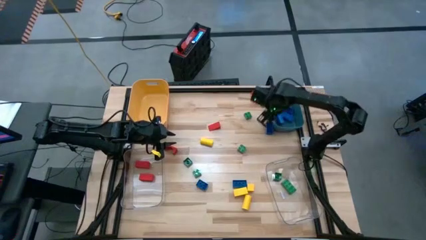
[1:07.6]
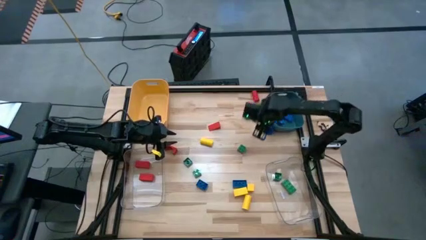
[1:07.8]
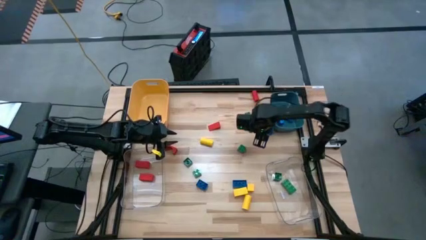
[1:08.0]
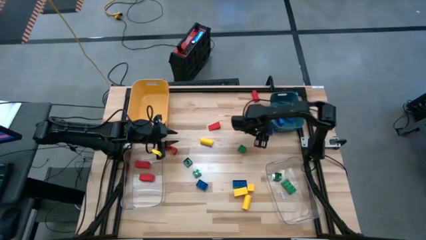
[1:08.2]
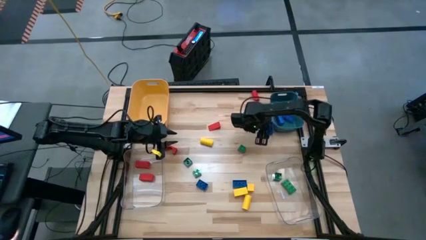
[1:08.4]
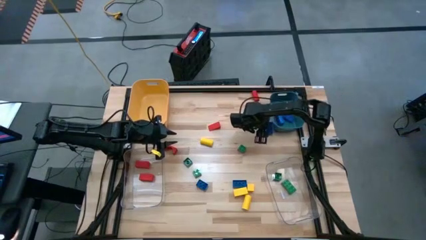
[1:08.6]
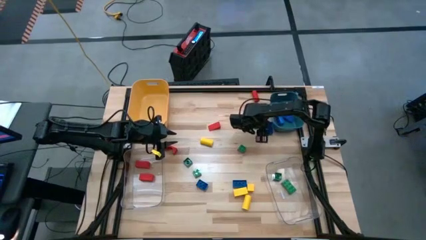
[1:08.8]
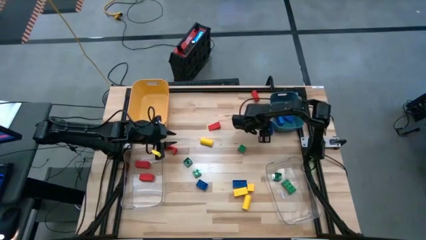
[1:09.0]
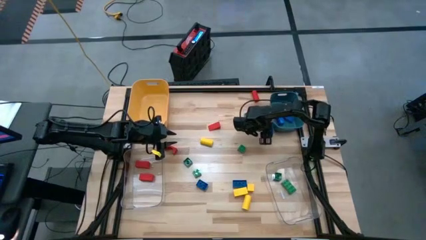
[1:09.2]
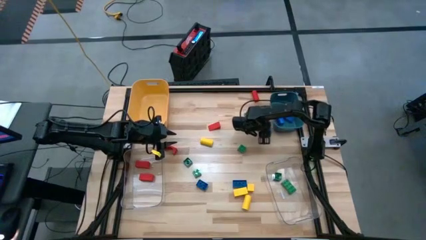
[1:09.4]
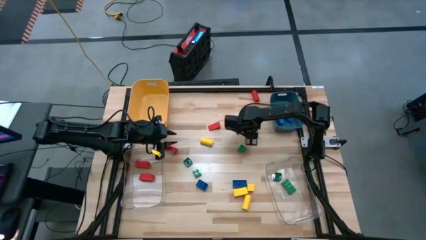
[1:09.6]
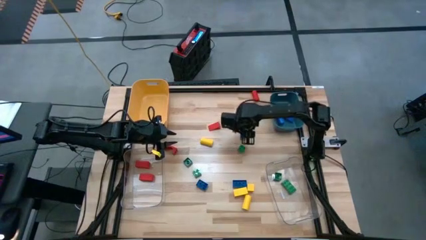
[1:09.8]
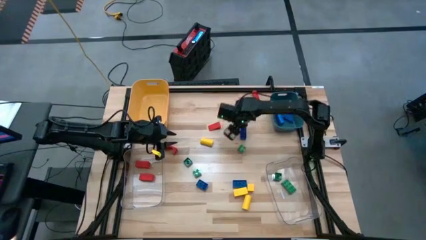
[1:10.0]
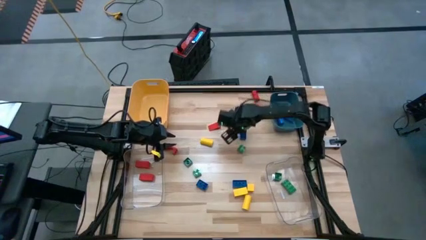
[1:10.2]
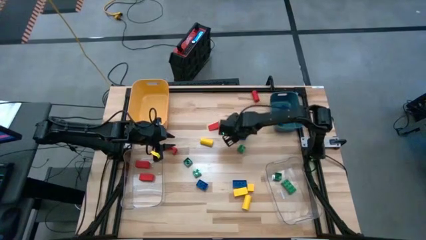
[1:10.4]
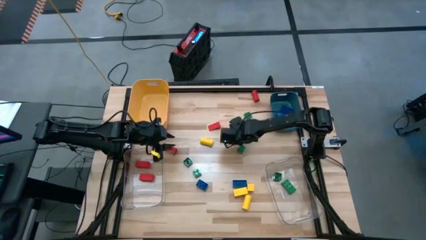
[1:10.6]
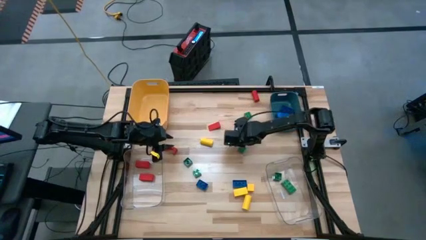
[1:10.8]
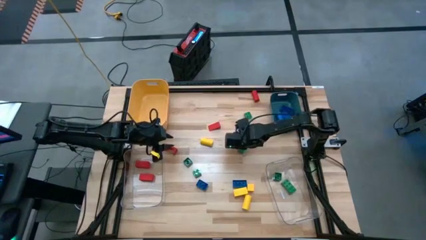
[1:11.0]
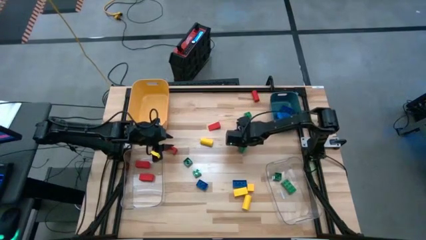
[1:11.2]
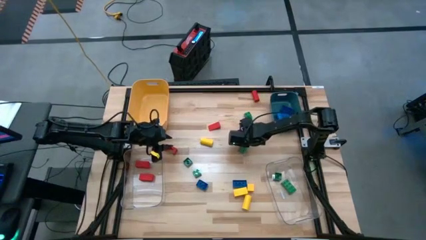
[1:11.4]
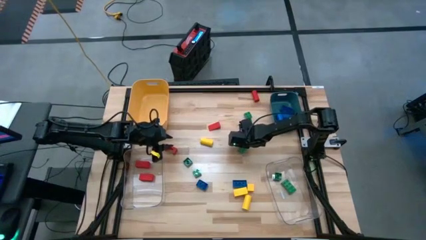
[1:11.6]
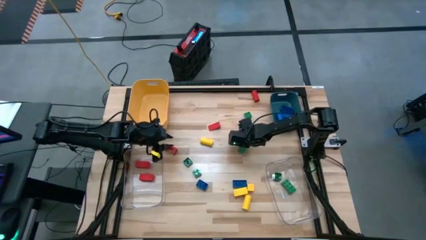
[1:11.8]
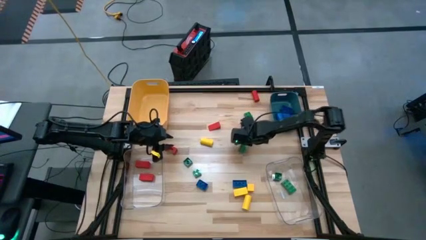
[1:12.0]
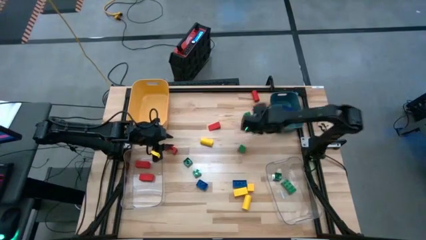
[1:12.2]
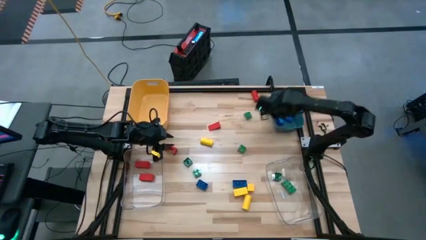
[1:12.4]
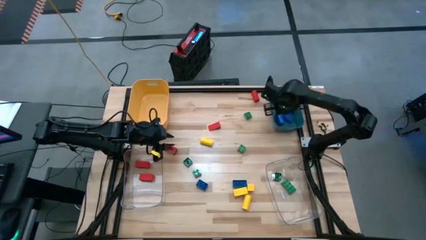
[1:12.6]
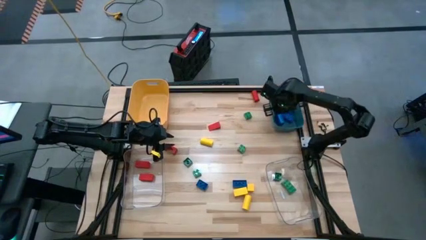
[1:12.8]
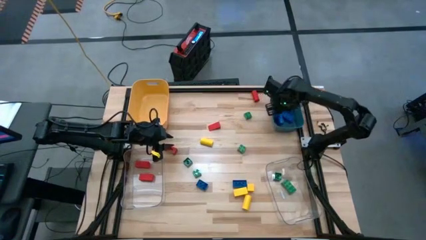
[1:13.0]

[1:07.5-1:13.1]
Task: Sort blocks
Put the blue game piece into the blue bin

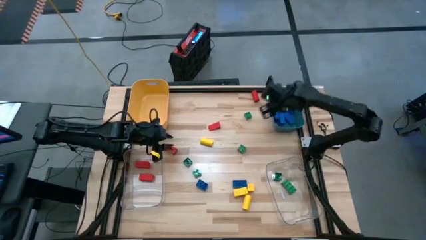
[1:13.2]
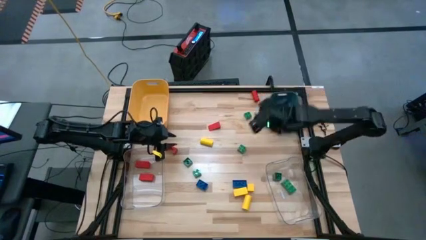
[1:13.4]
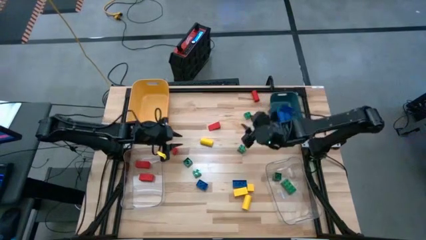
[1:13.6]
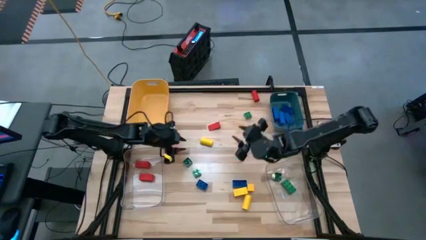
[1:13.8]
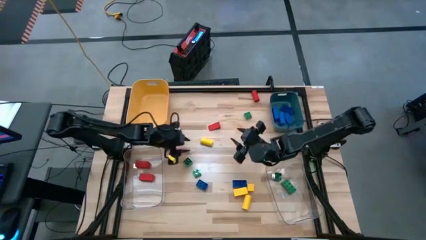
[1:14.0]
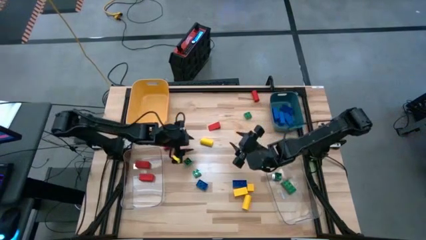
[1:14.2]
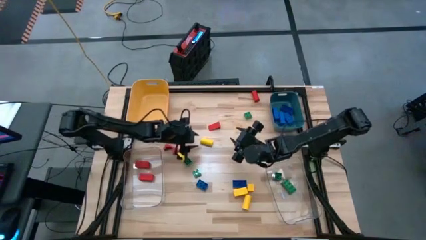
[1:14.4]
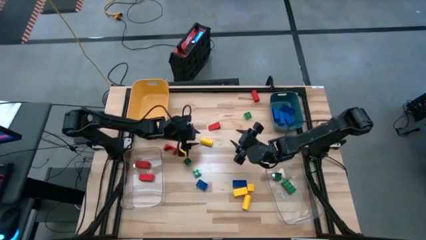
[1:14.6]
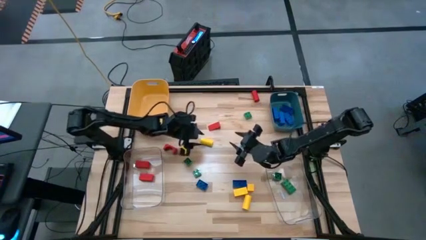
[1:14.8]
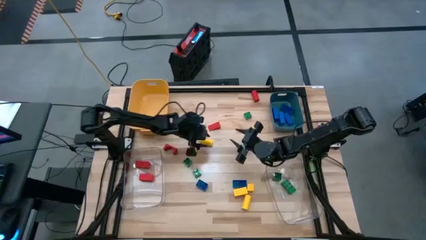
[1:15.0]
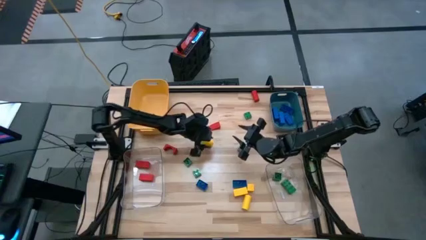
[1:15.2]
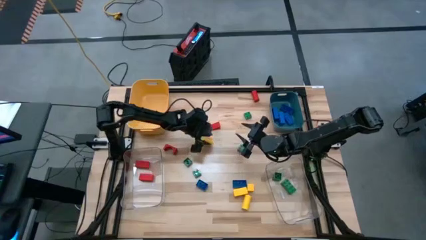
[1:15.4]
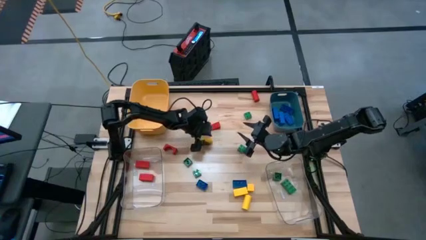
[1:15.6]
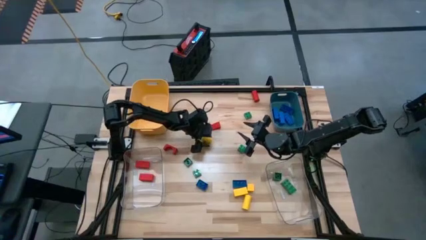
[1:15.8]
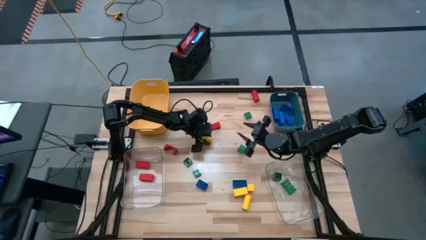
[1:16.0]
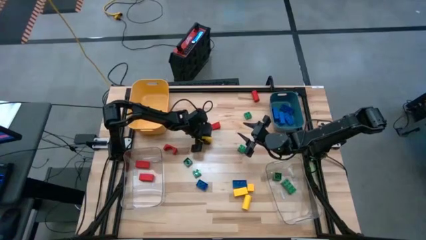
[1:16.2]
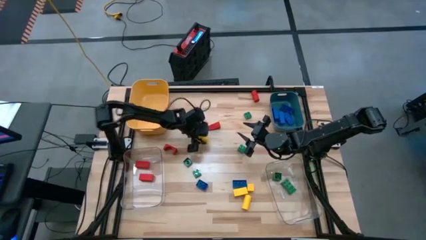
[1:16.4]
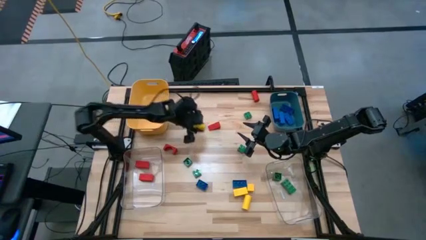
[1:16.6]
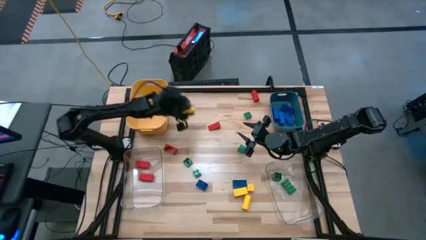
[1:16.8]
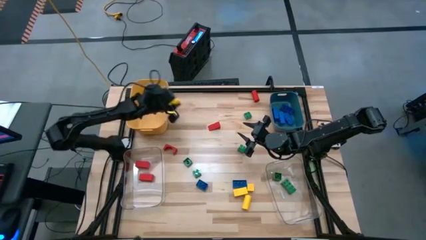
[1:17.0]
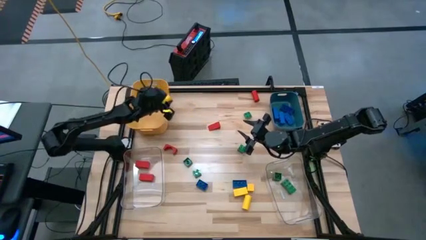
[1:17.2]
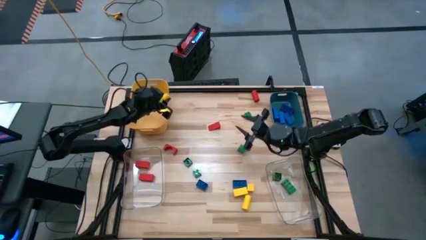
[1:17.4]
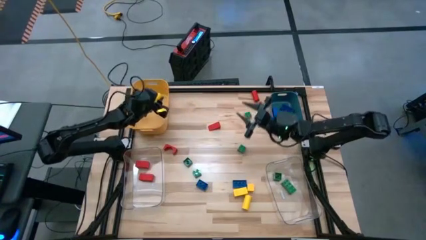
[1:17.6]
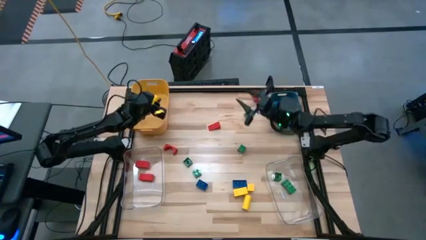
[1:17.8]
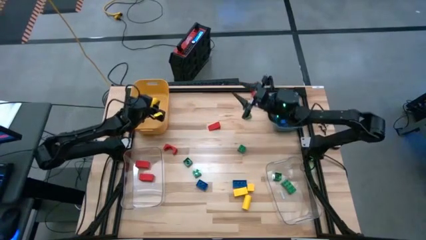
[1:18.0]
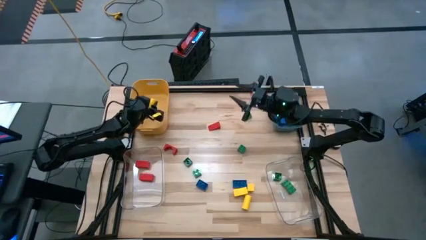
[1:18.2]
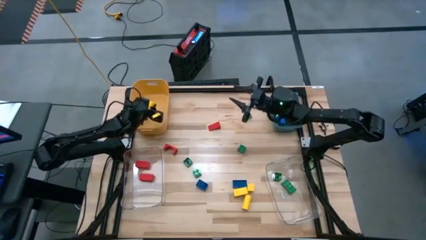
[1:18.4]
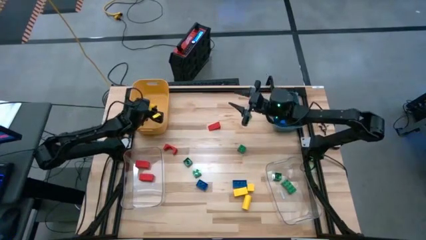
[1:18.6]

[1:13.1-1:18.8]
Put the yellow wooden block into the yellow bin

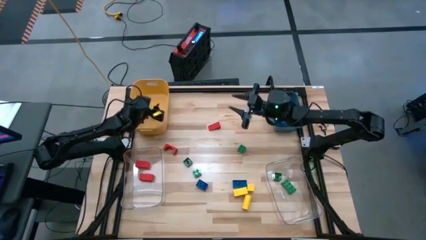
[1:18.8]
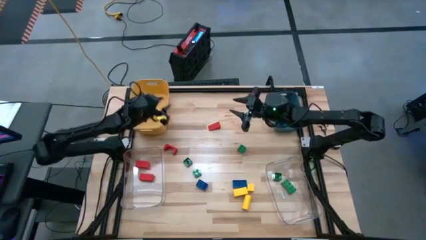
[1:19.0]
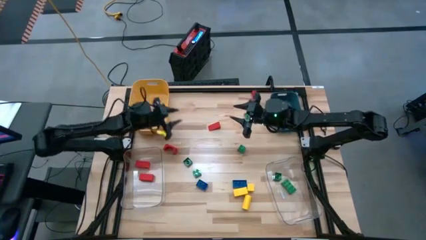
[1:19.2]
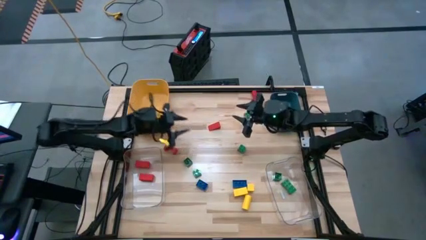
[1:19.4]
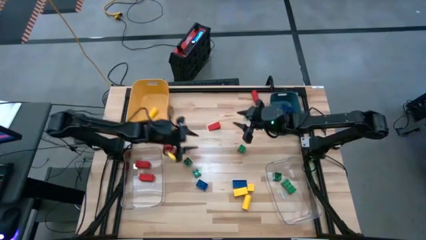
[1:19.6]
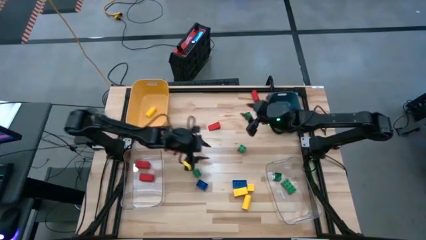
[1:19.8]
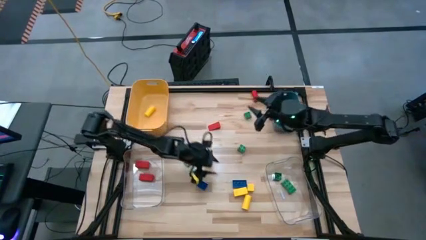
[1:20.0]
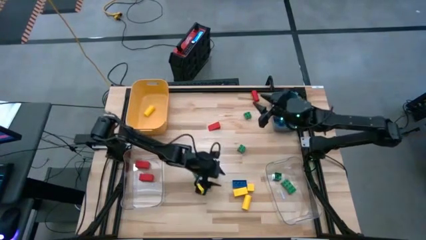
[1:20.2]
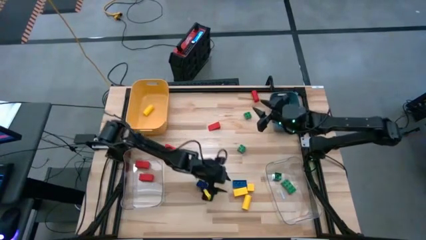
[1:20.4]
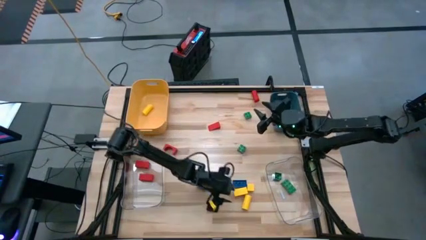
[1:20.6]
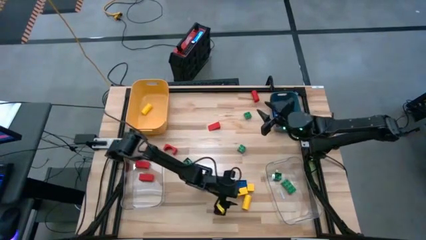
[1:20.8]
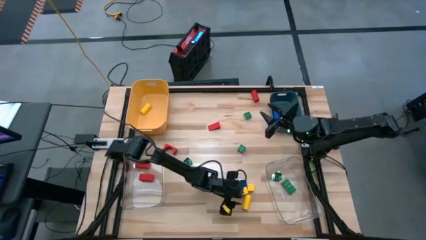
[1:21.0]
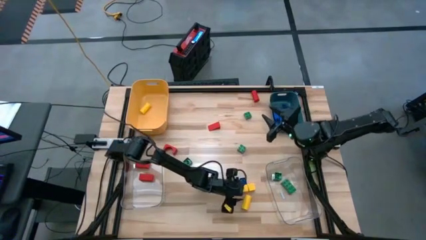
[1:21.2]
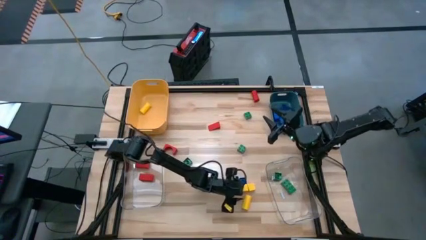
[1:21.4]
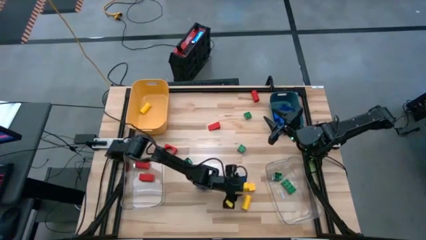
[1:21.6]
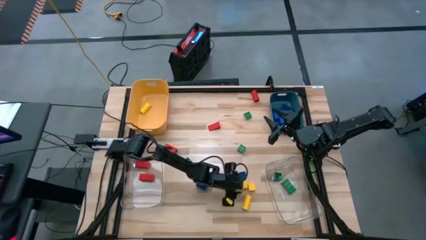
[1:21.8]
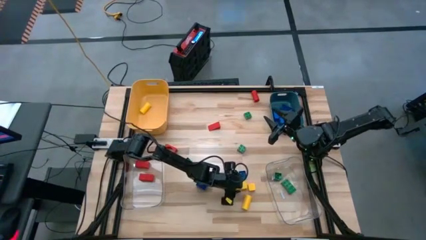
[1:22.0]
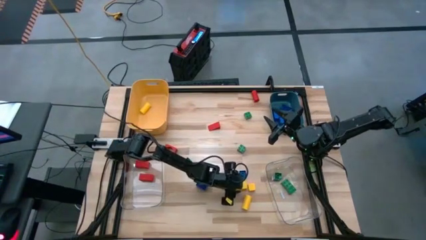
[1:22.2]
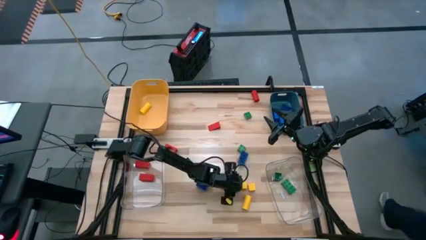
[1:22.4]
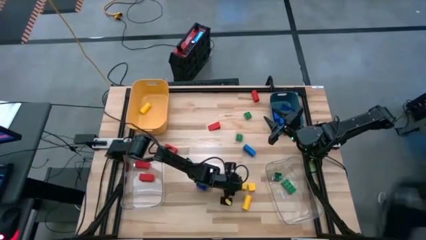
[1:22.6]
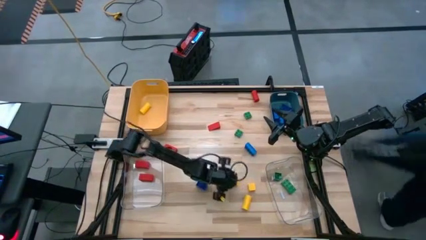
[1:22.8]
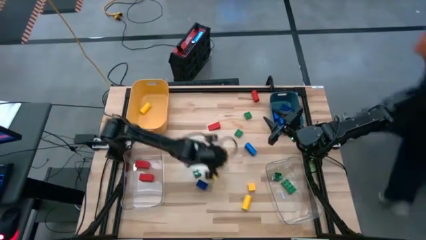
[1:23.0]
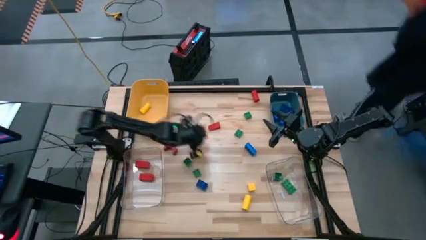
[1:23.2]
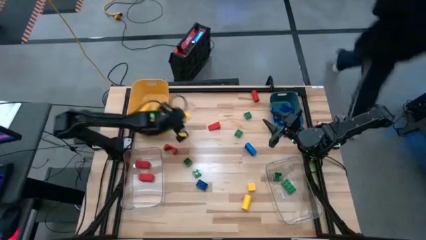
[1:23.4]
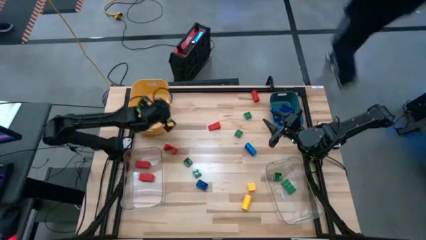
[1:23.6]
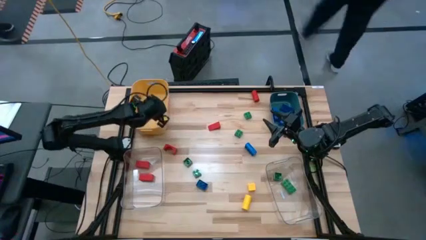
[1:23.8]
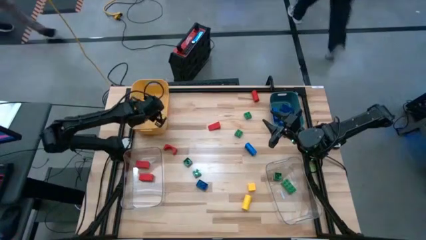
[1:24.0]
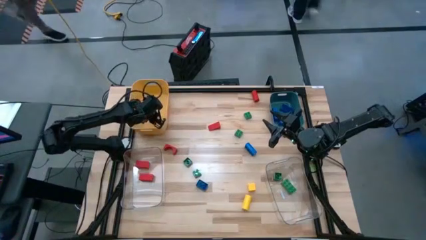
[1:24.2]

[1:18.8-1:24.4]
Put the yellow wooden block into the yellow bin
